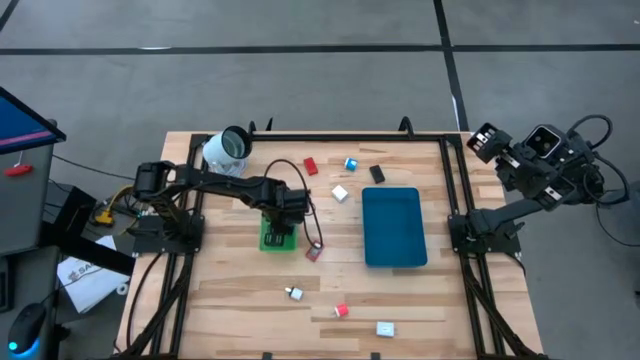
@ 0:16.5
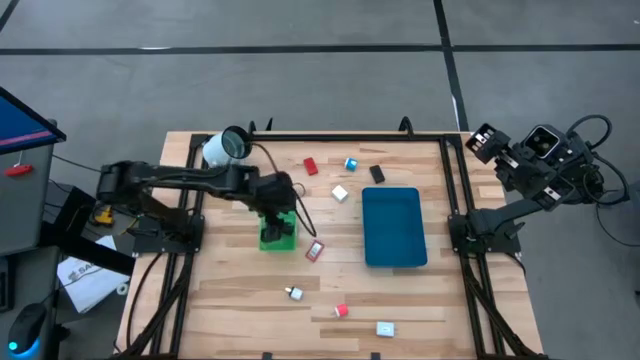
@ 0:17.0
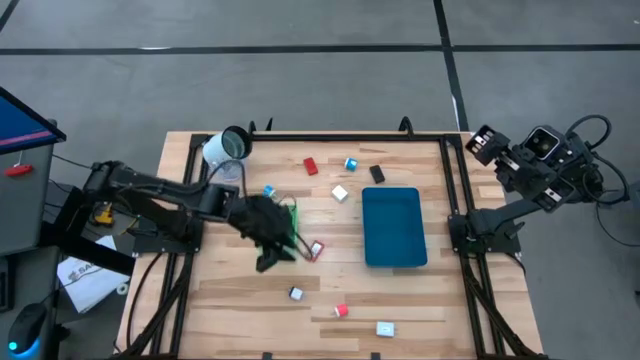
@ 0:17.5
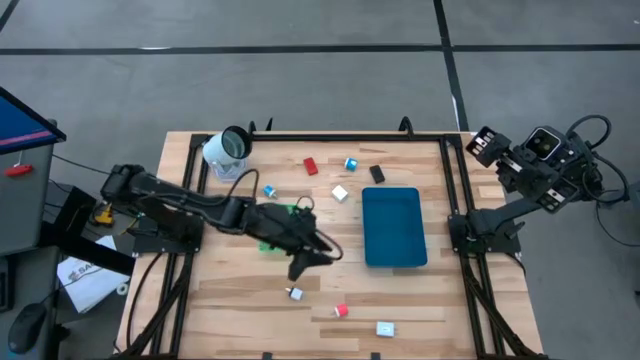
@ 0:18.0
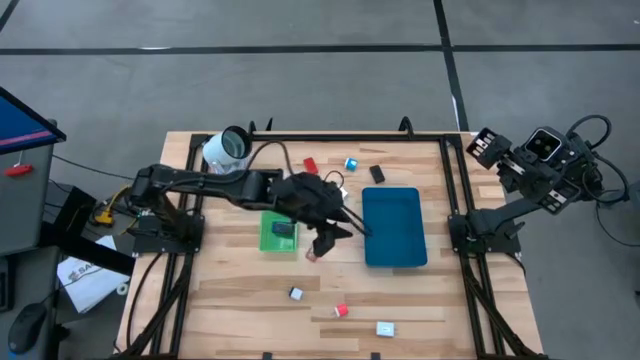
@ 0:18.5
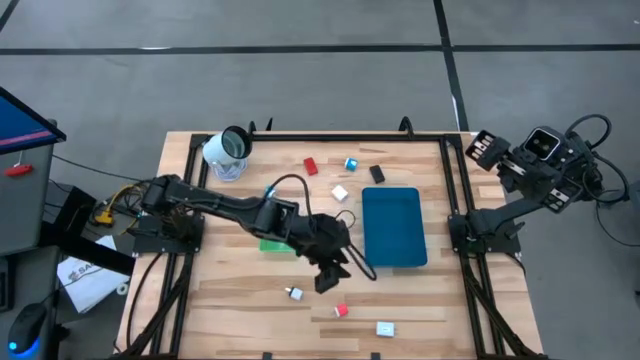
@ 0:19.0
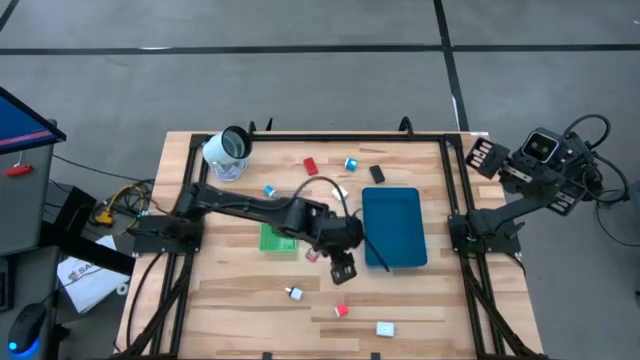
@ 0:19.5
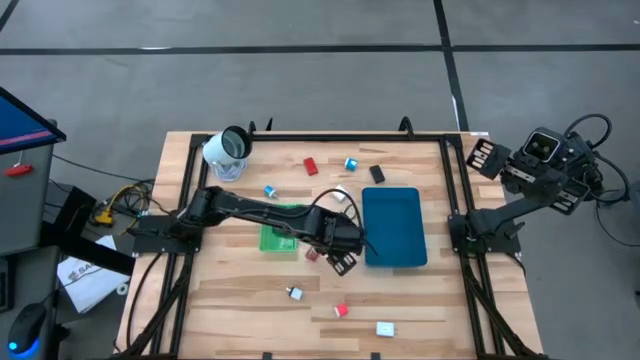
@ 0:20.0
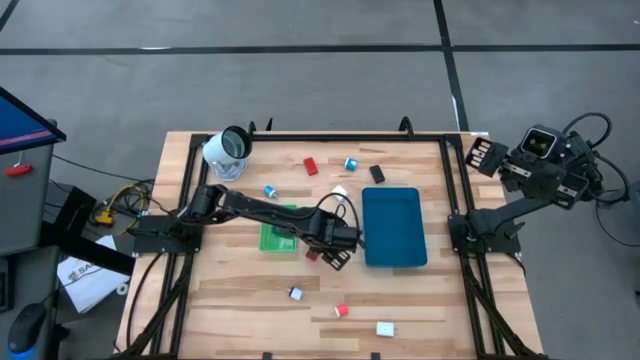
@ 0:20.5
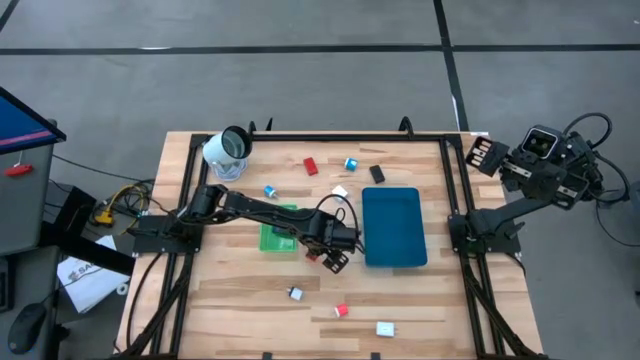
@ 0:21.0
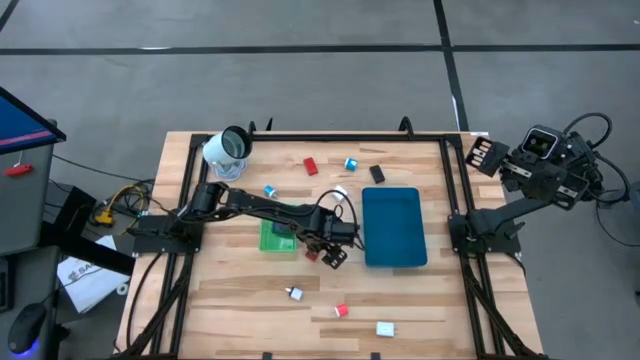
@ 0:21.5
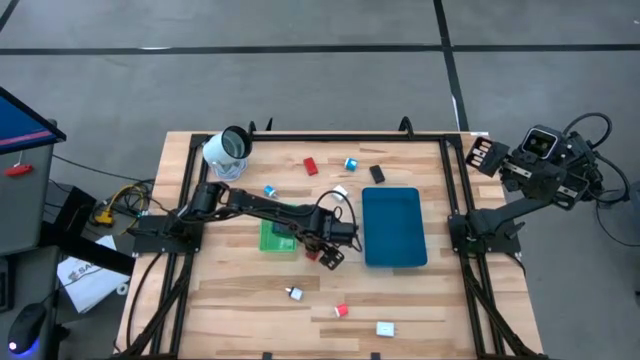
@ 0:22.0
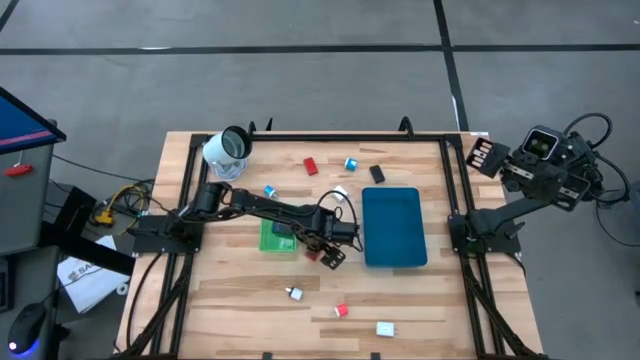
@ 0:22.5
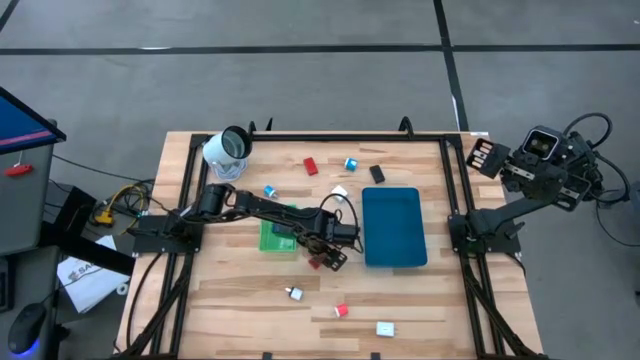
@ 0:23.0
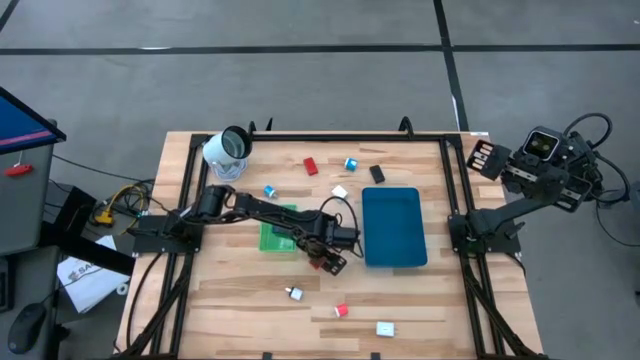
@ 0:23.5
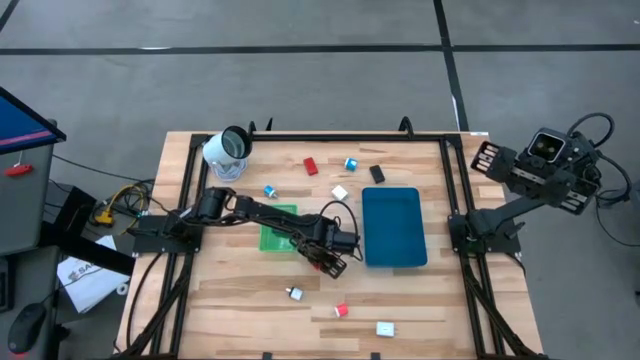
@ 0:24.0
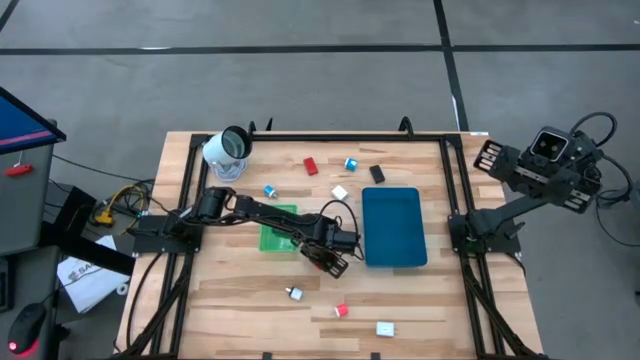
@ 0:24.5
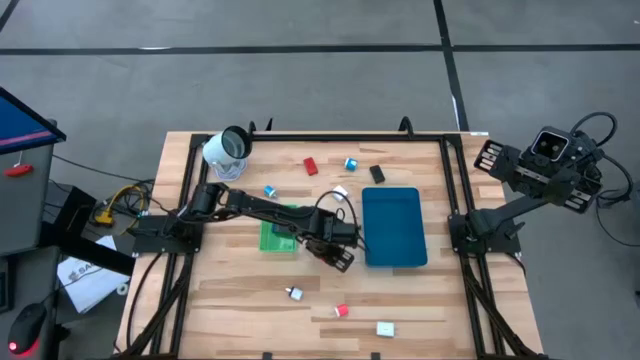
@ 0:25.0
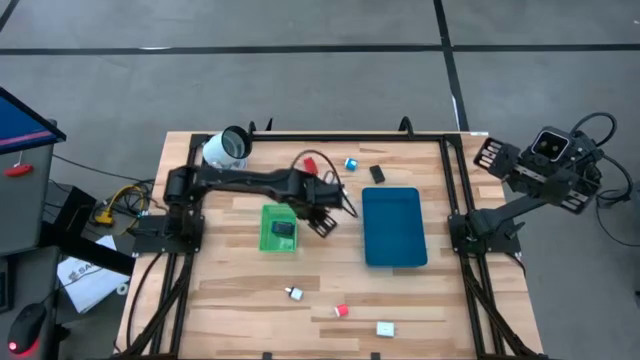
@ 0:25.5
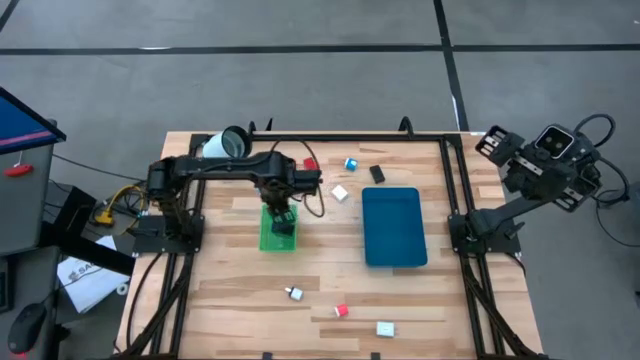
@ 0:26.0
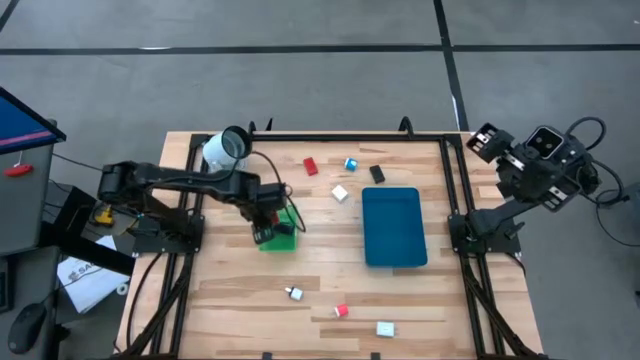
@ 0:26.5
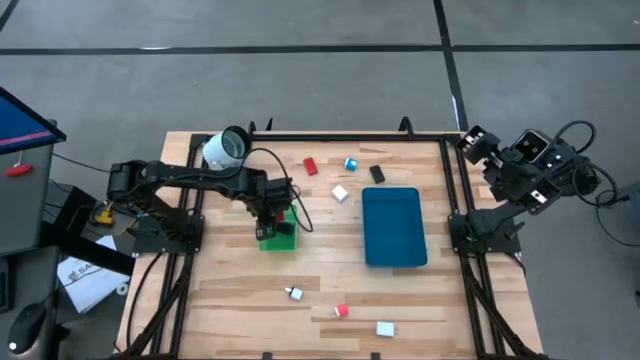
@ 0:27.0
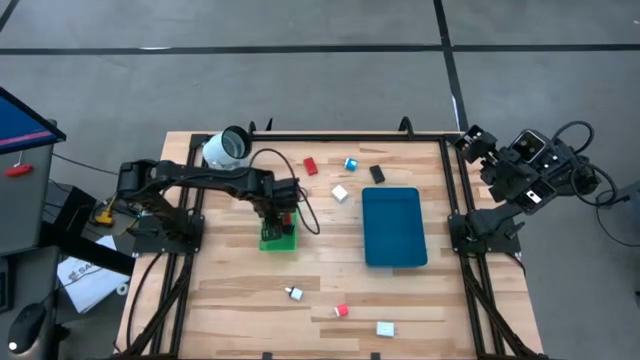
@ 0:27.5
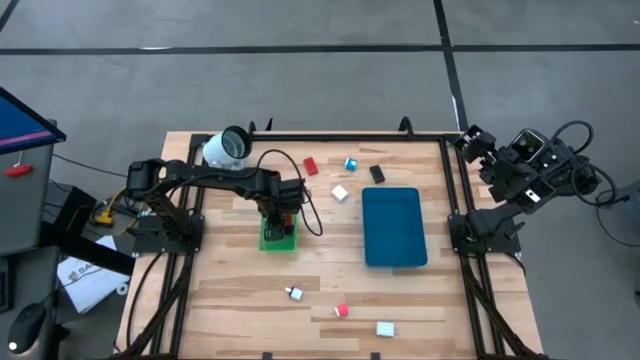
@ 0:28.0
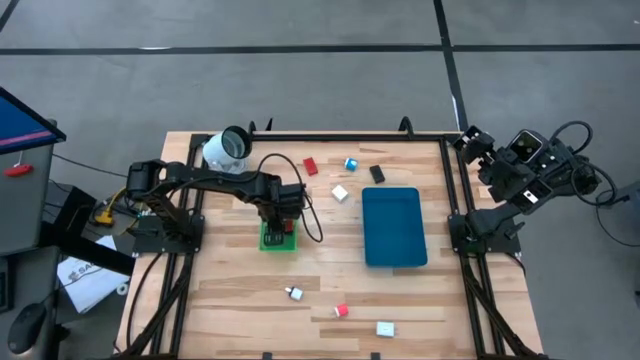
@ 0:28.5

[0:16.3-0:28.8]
Task: Pick & Place Office items
Put the bottom red digital timer into the green basket

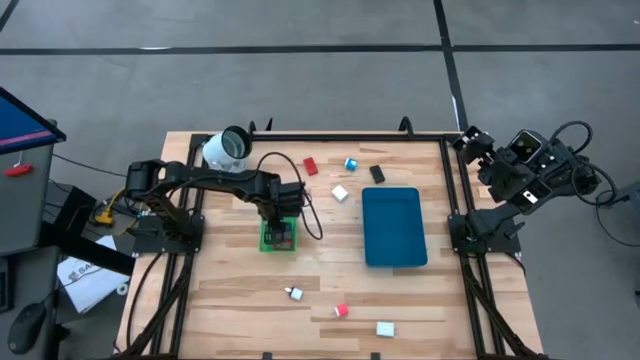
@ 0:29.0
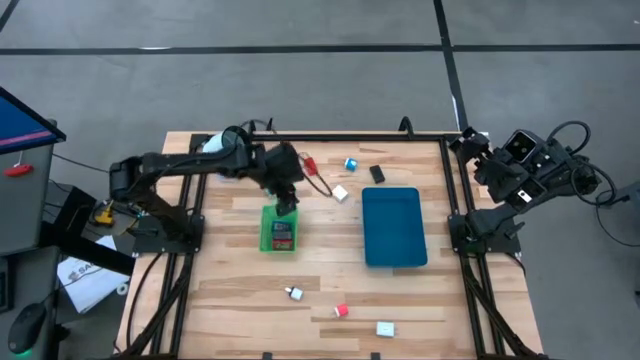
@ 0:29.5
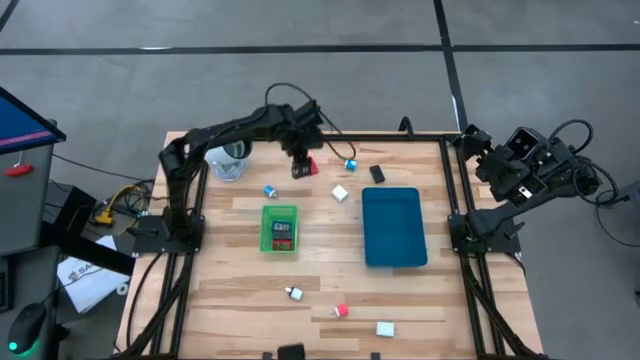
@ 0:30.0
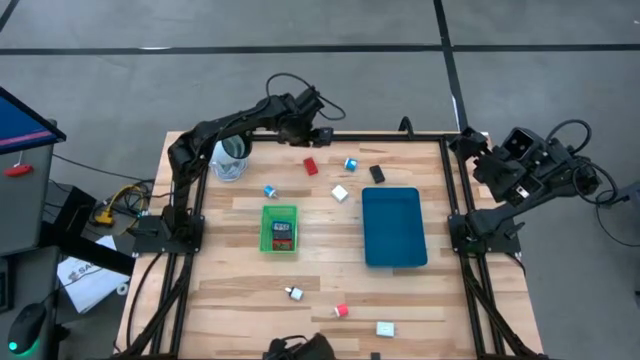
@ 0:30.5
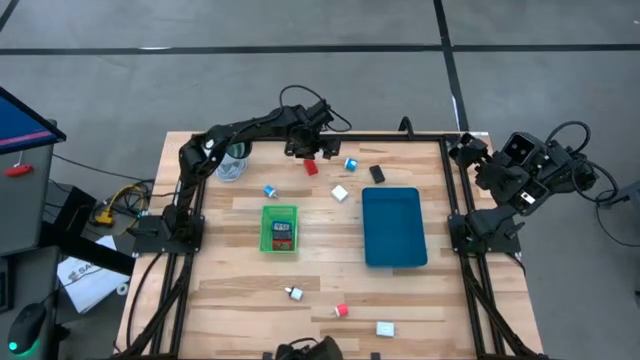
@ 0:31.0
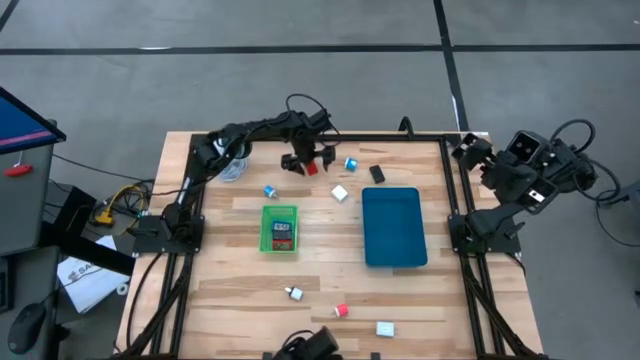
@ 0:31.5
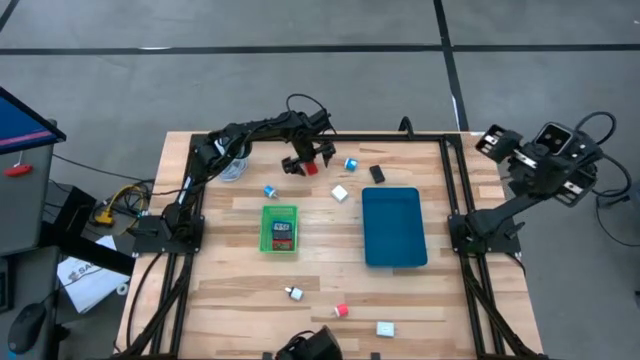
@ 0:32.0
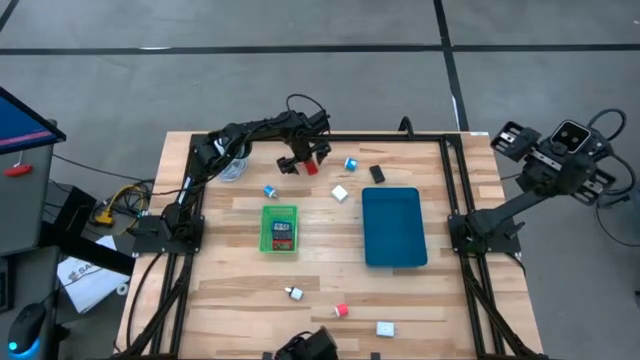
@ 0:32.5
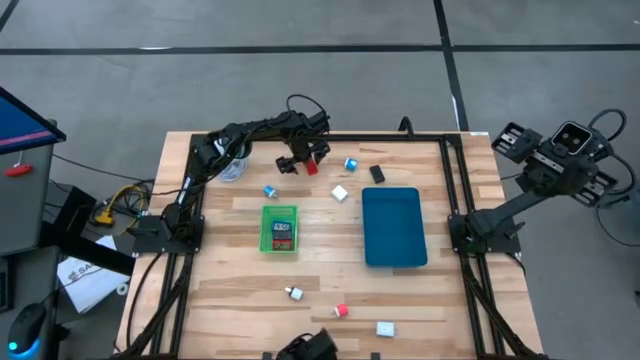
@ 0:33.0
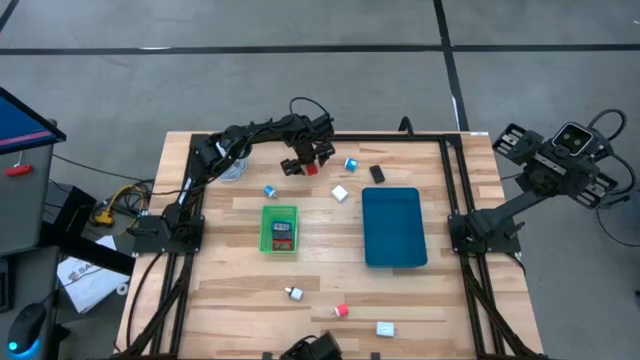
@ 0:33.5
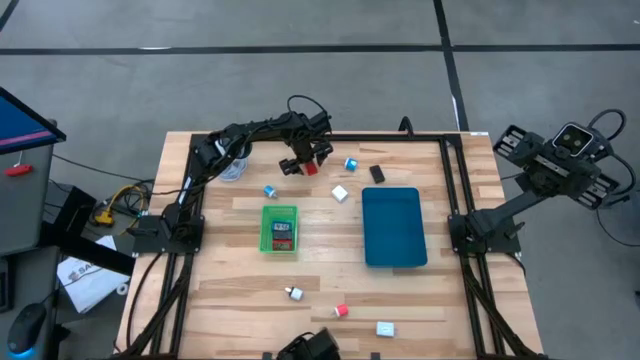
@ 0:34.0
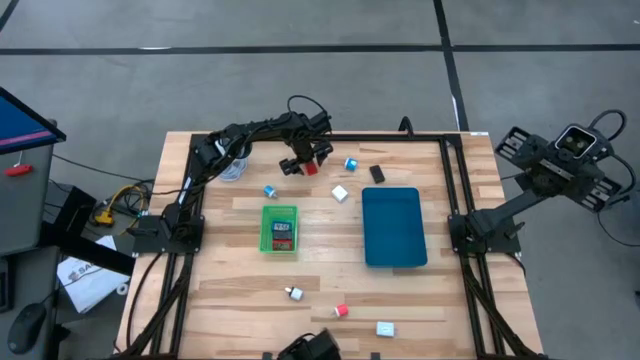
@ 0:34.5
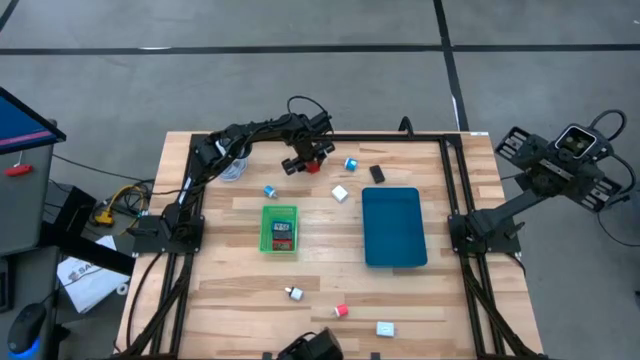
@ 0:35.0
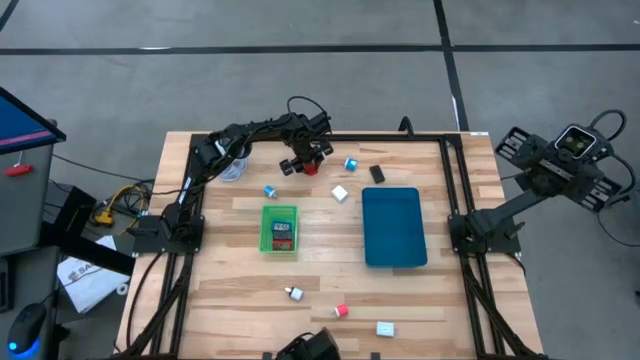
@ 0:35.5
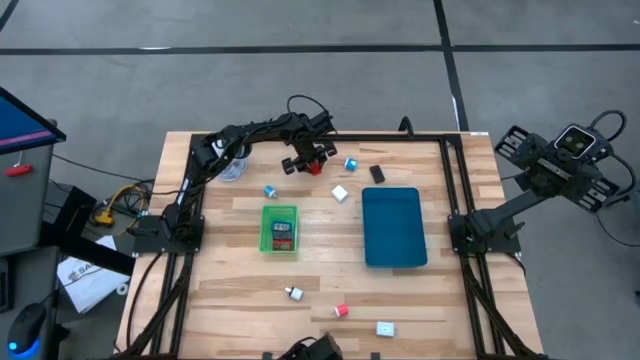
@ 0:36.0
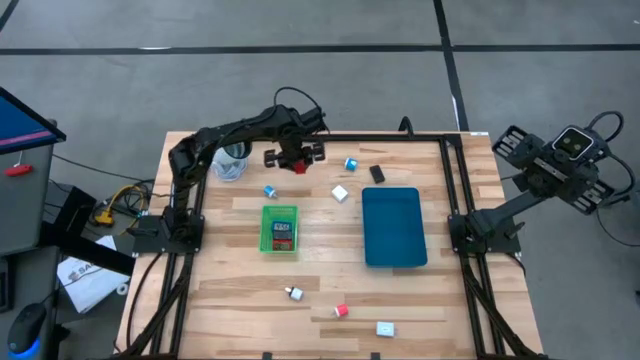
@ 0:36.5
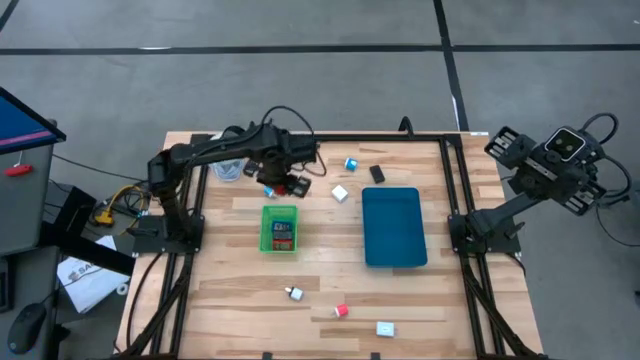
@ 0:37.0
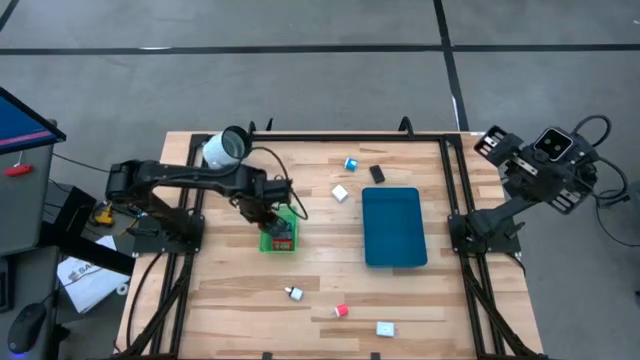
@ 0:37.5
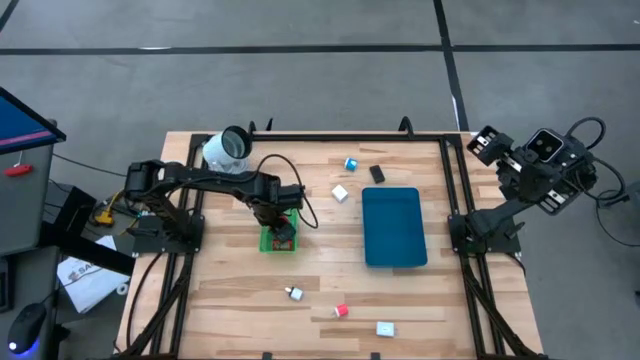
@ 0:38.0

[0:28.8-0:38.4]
Put the red digital timer into the green basket
